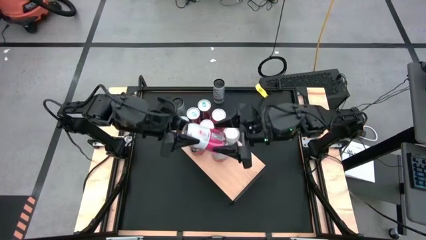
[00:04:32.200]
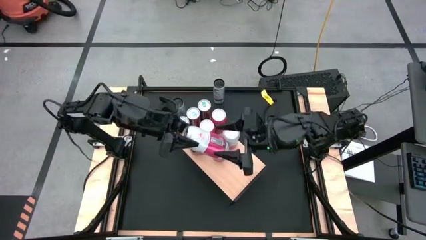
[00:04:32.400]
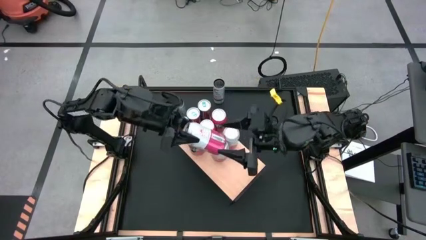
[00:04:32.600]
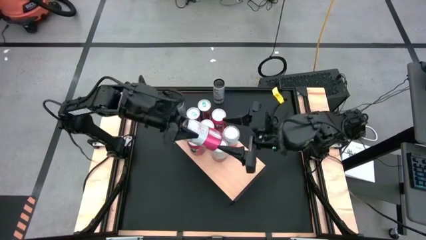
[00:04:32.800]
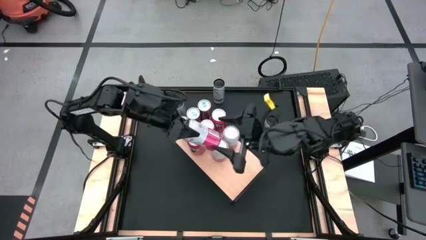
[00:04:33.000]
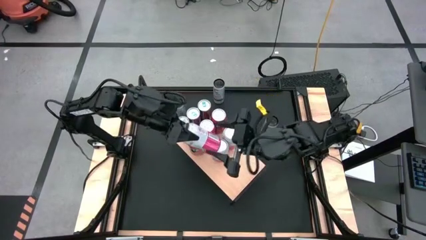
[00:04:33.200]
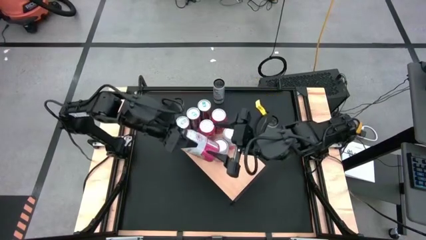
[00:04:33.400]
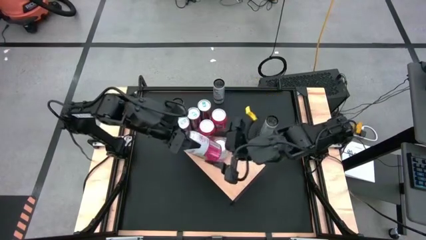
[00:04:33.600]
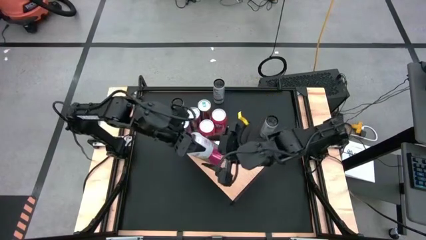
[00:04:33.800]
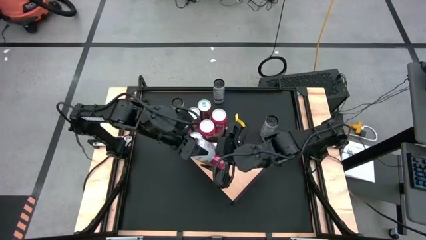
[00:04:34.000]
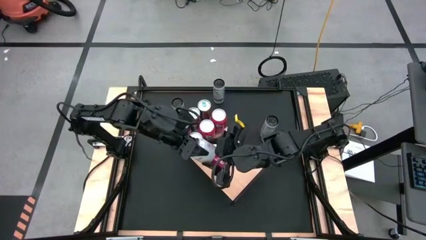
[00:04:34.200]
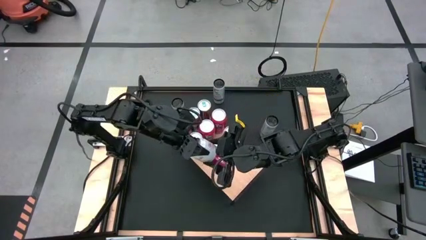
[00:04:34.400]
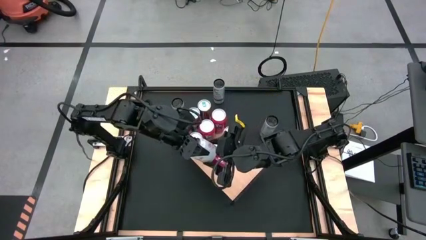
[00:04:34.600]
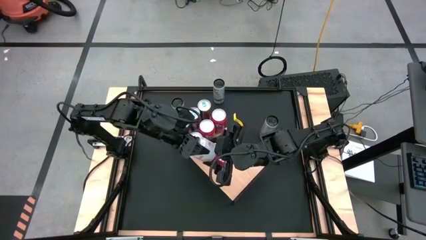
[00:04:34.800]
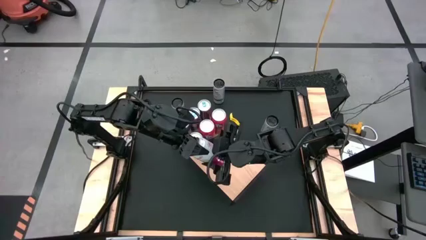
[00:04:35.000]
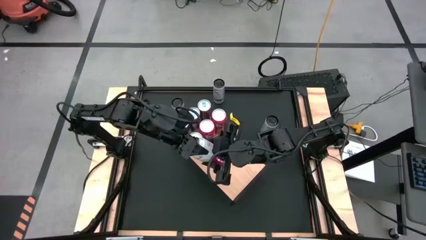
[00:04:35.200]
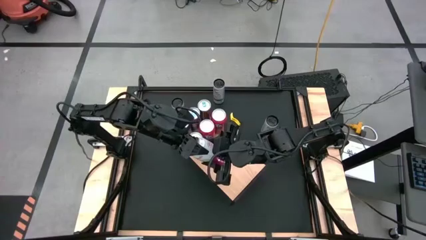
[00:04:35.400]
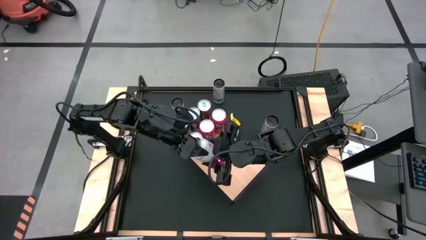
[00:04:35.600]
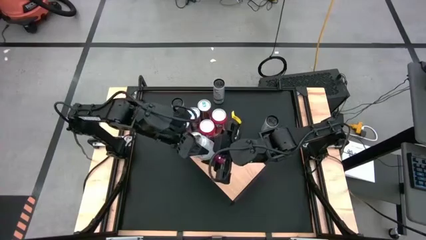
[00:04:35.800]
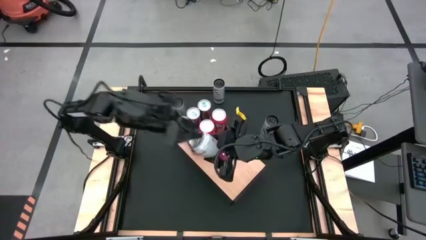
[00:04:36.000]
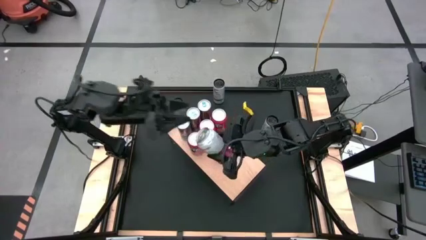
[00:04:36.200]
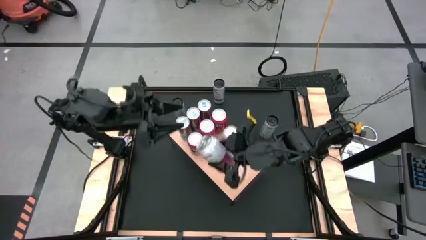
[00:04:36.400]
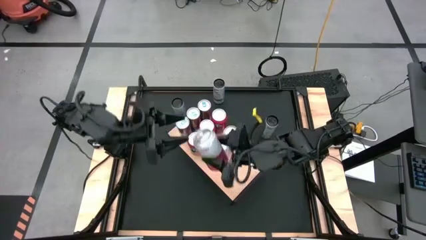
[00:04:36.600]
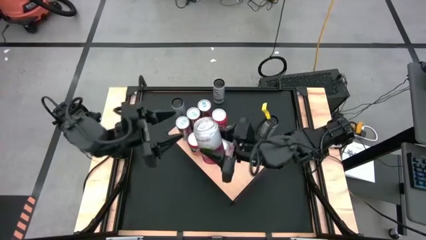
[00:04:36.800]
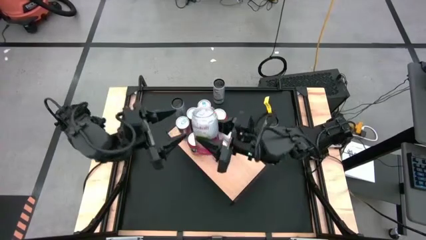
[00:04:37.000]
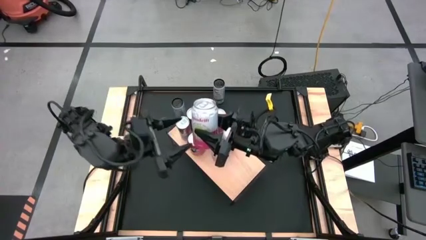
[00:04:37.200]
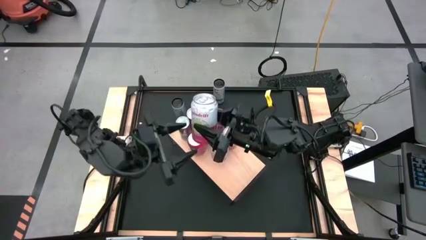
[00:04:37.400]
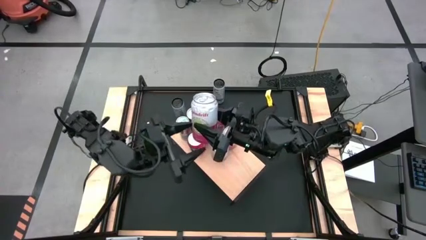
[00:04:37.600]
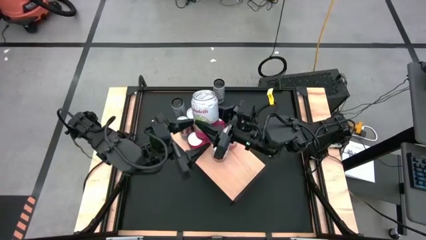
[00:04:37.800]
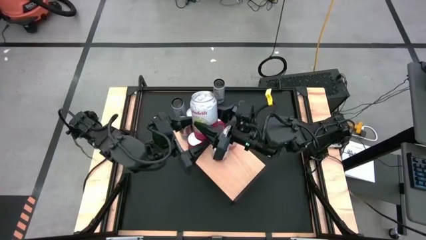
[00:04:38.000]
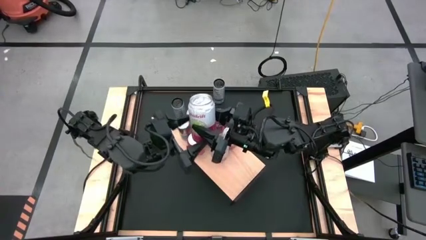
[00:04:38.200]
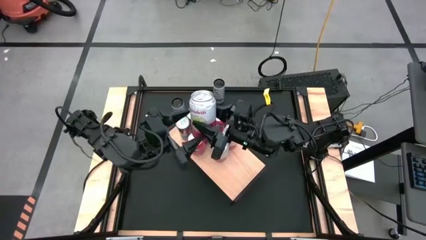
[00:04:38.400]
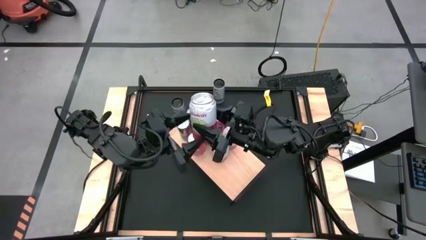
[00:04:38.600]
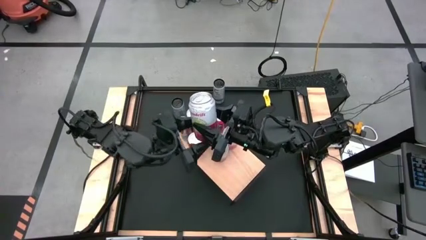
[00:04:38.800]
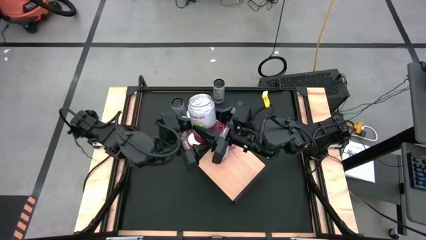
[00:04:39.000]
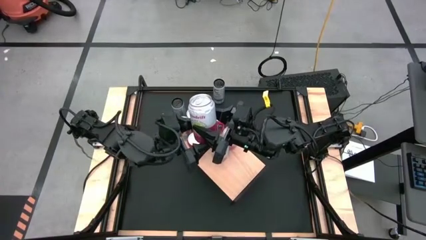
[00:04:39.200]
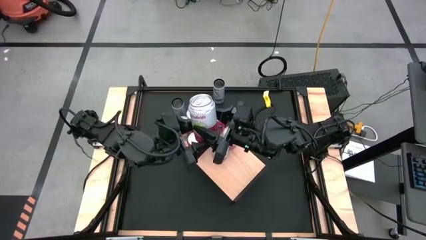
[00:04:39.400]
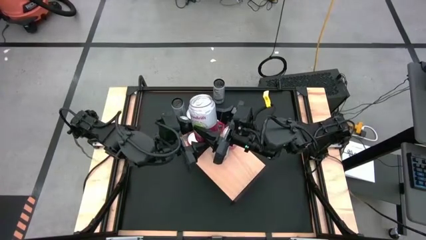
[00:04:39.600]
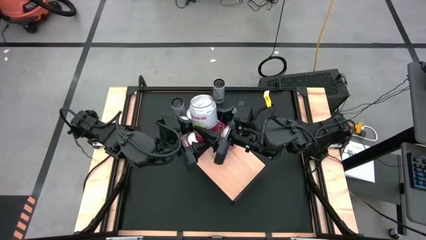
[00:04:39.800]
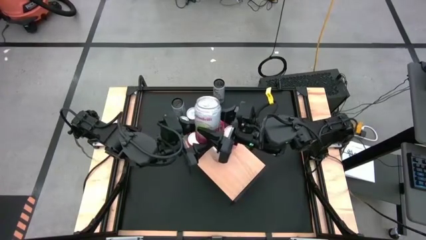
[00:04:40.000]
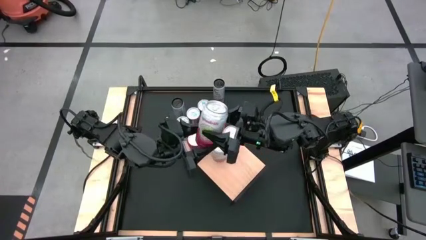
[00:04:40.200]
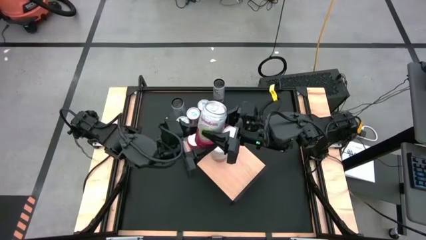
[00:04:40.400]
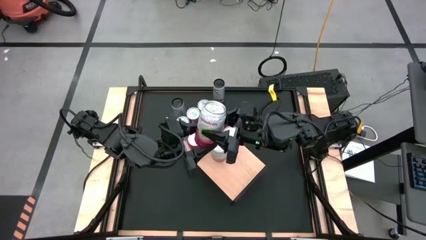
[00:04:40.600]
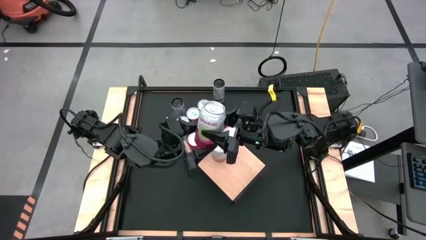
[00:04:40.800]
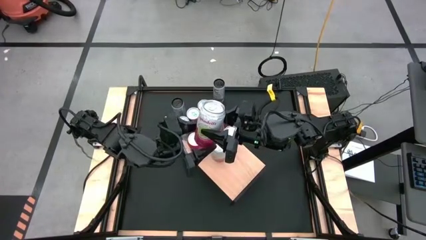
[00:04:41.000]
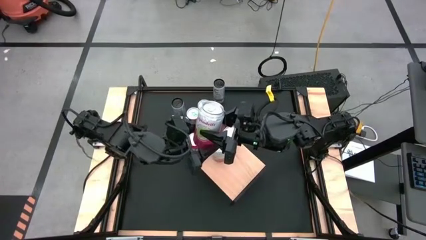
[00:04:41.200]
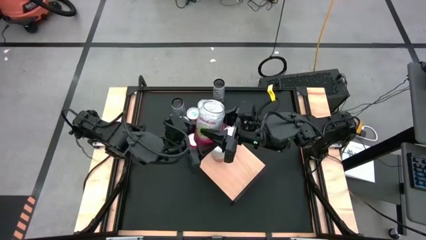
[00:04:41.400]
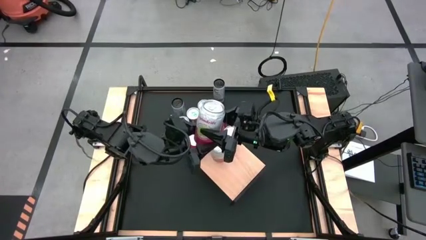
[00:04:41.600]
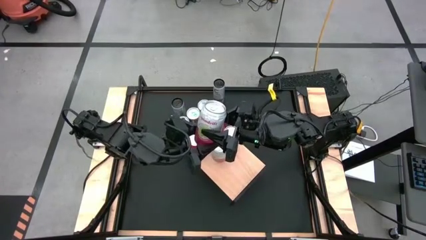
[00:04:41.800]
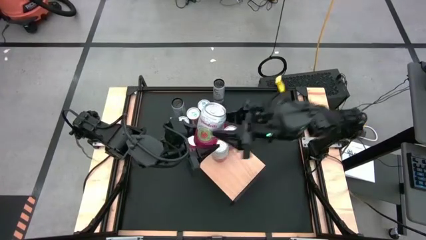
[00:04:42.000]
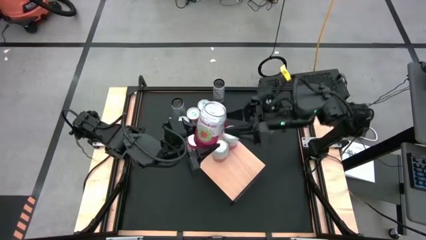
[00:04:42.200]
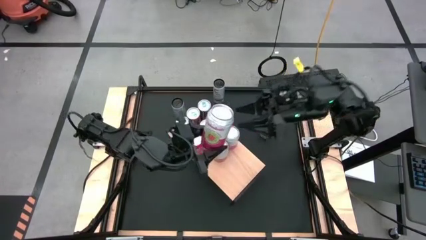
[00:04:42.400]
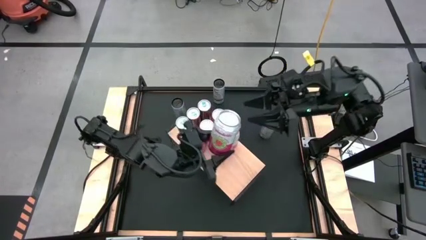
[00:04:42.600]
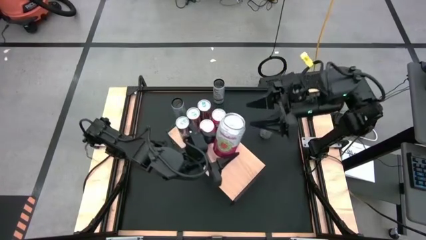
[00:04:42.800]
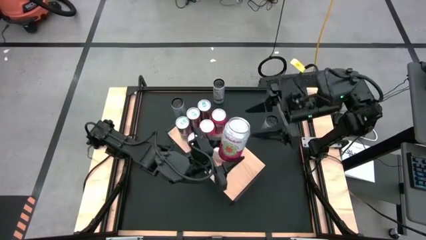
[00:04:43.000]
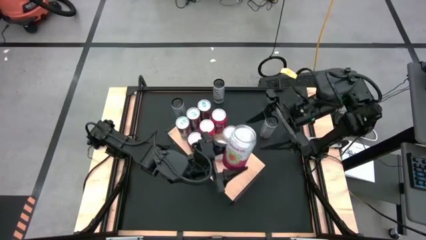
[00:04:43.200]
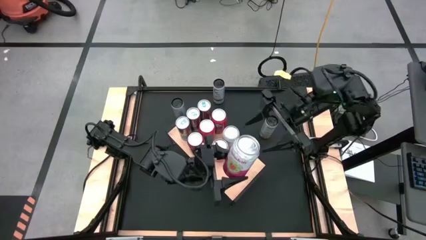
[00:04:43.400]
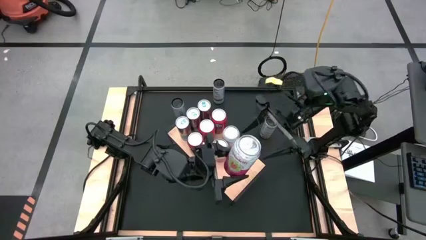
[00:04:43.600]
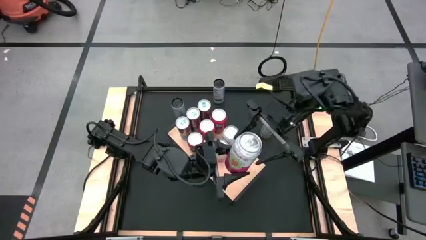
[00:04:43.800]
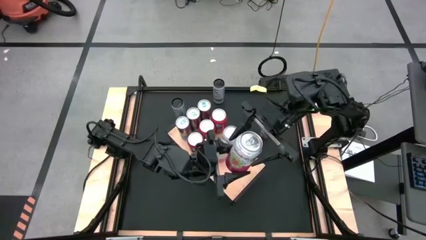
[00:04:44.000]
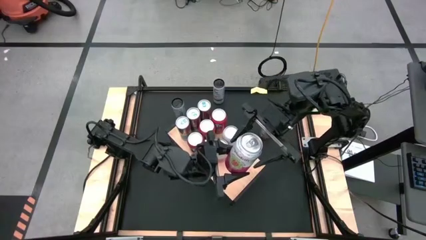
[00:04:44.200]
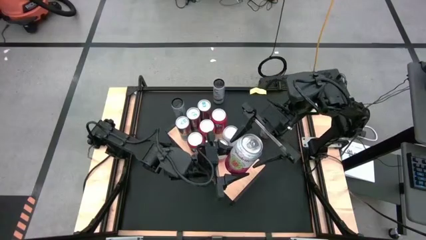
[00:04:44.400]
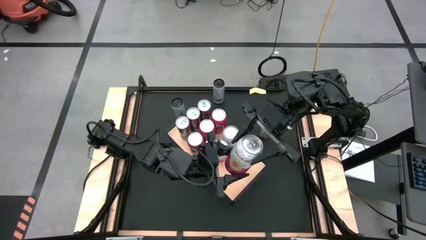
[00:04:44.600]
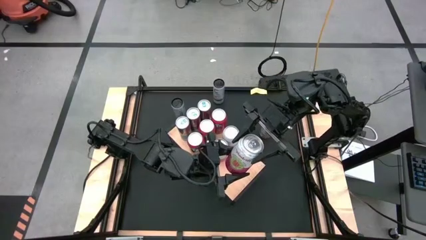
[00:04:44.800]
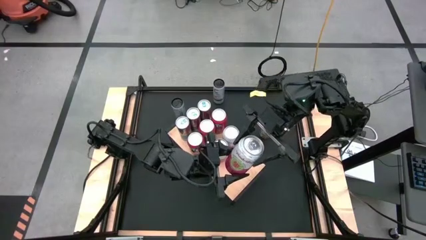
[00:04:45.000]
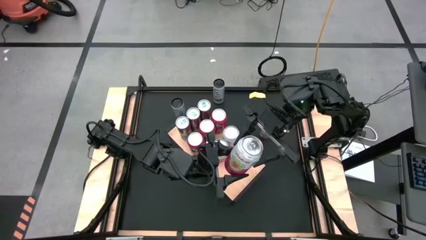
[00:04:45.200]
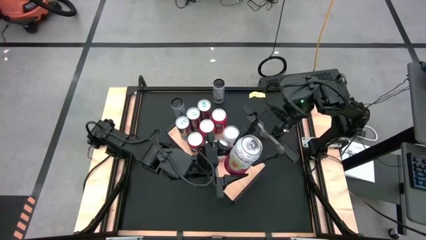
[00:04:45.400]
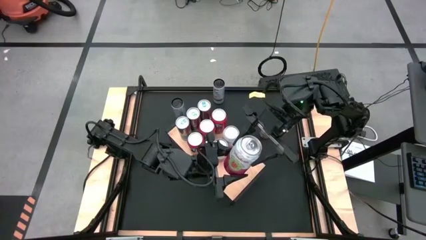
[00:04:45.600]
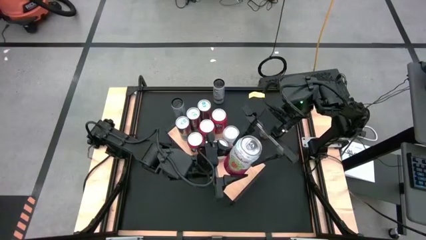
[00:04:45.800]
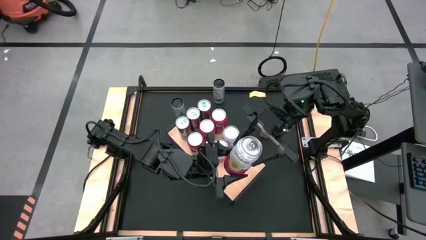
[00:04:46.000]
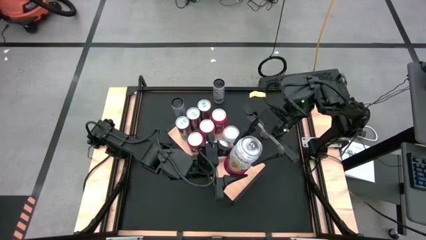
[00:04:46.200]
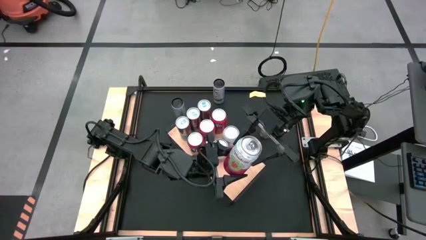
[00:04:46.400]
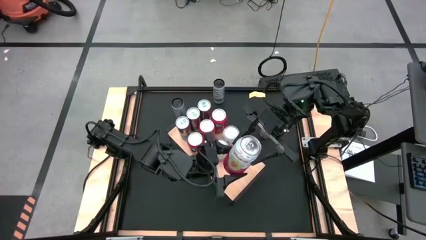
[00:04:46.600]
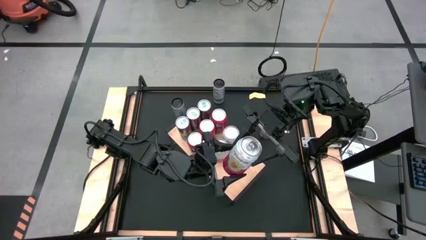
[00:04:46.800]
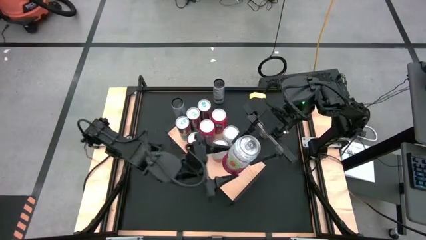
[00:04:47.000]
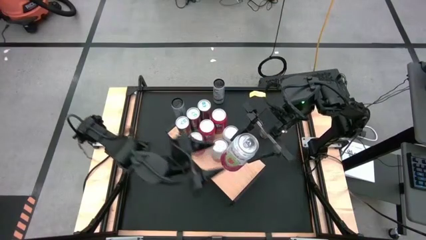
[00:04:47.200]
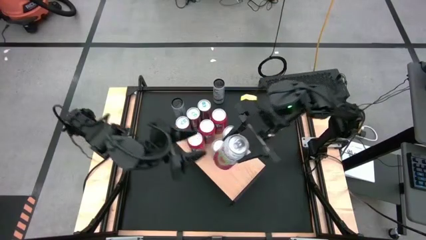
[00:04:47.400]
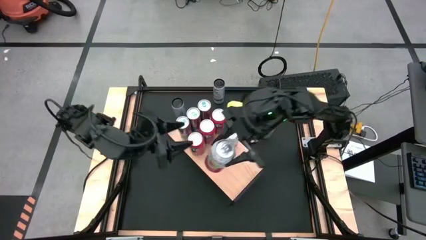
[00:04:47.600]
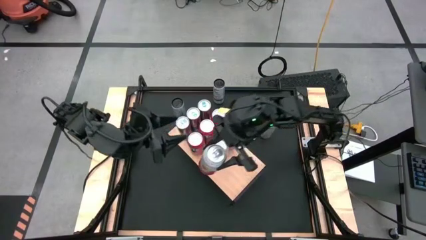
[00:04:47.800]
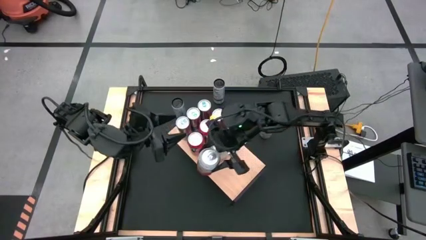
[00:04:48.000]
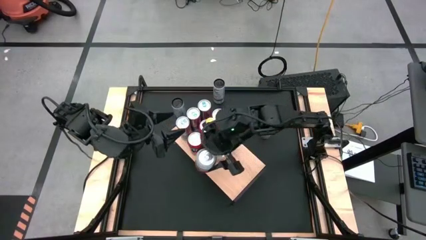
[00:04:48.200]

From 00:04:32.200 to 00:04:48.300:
Task: Place canned beverage on shelf
Put the pink soda can on the shelf aligned with the other pink soda cans
